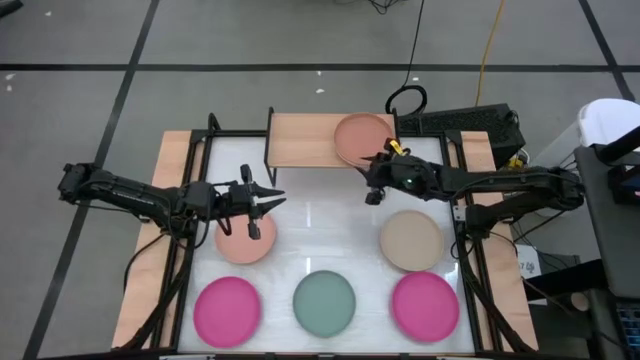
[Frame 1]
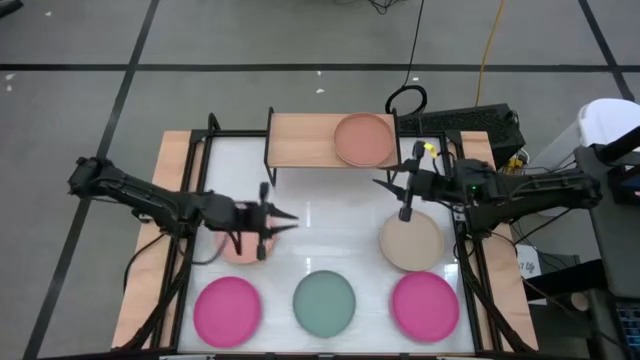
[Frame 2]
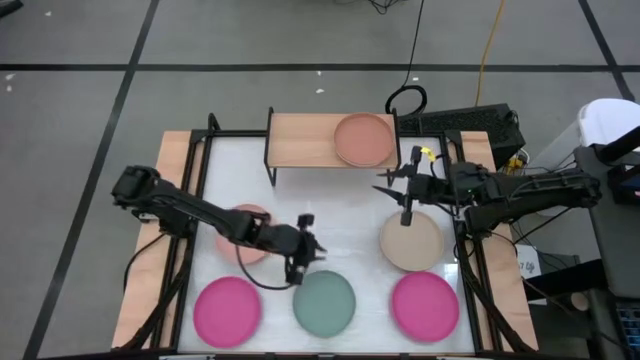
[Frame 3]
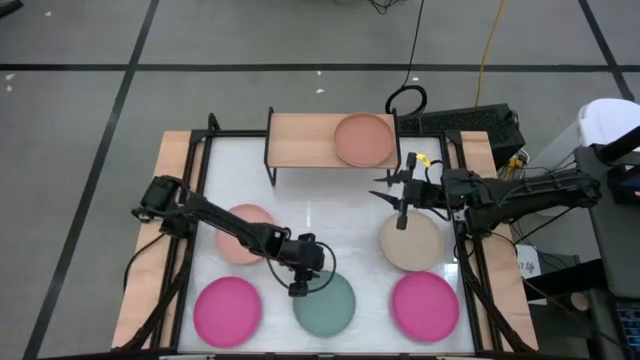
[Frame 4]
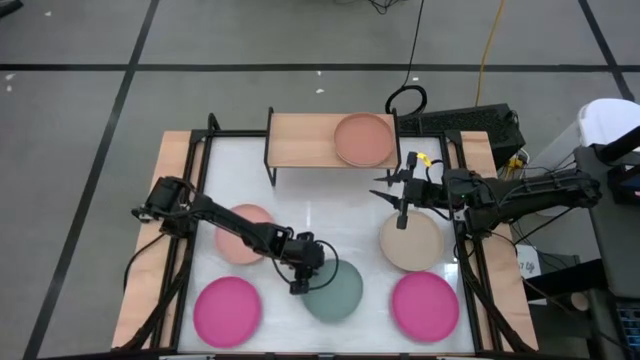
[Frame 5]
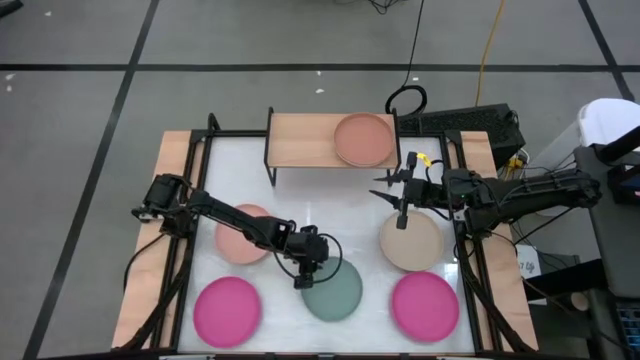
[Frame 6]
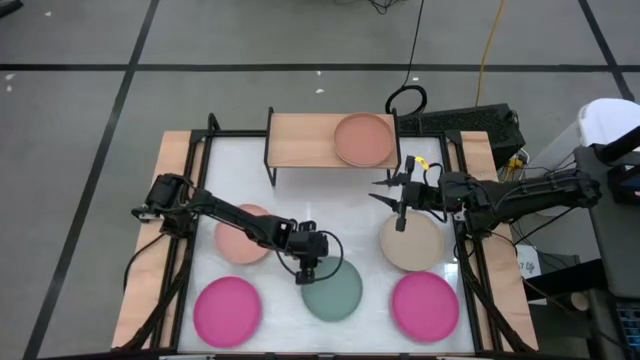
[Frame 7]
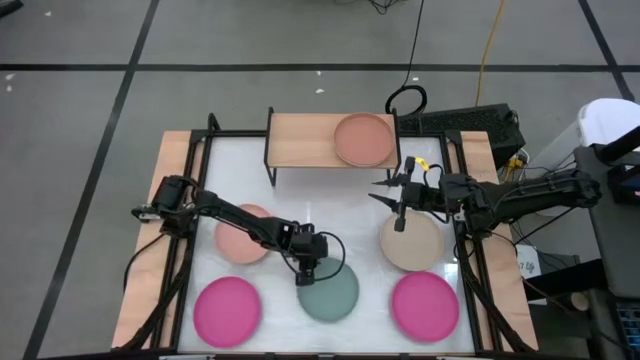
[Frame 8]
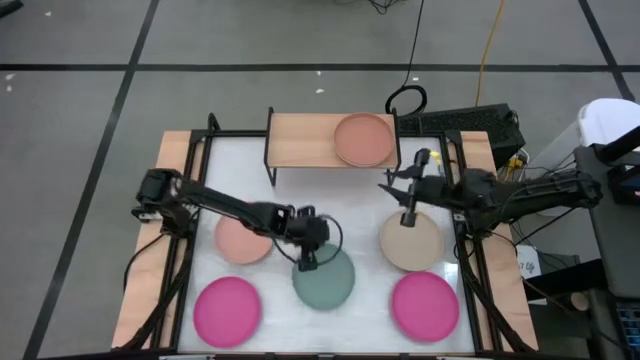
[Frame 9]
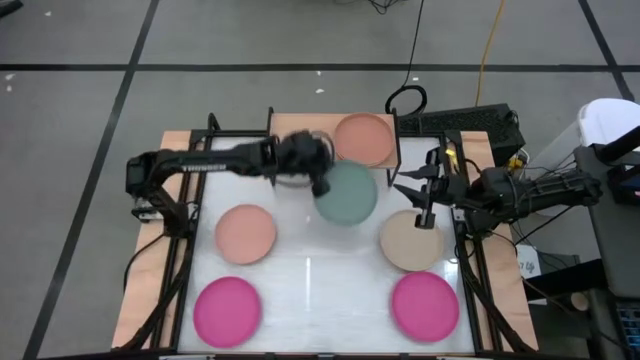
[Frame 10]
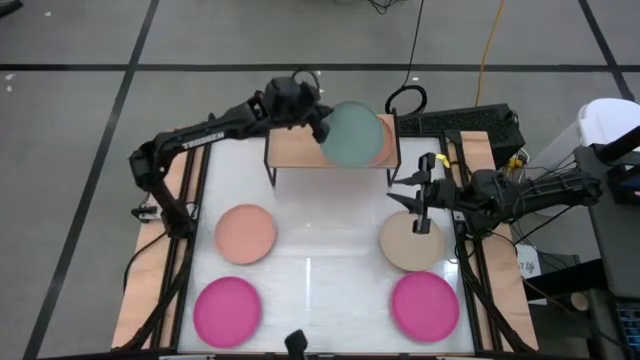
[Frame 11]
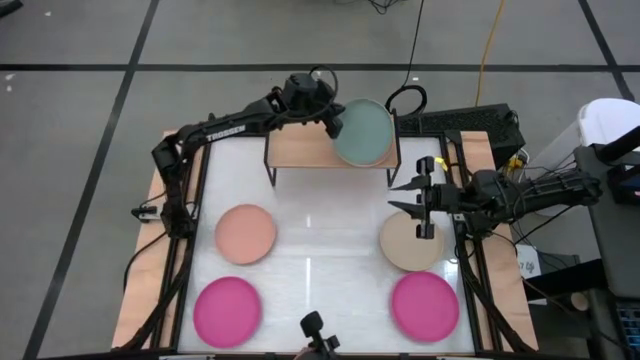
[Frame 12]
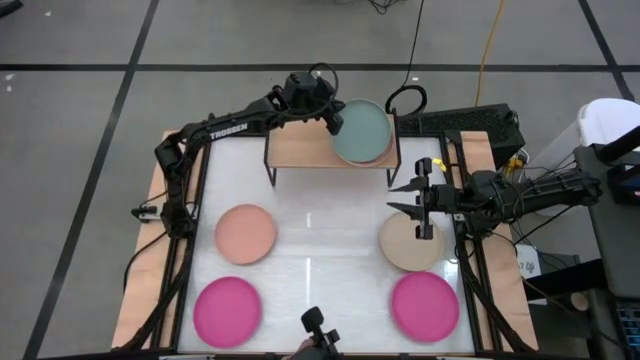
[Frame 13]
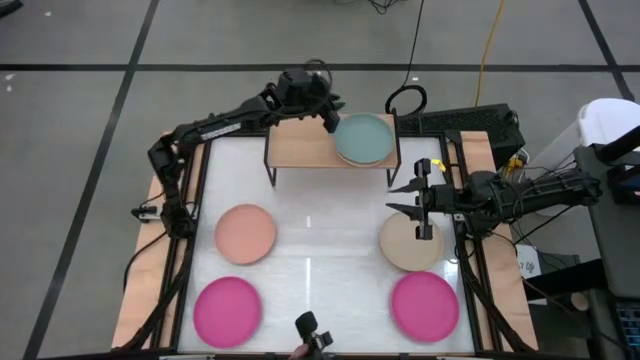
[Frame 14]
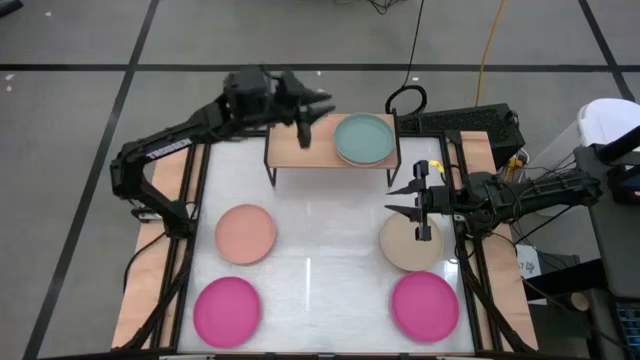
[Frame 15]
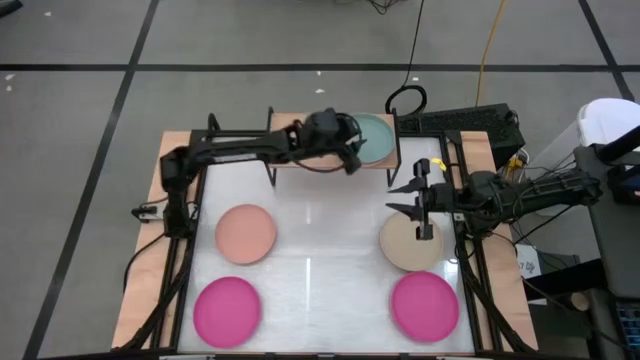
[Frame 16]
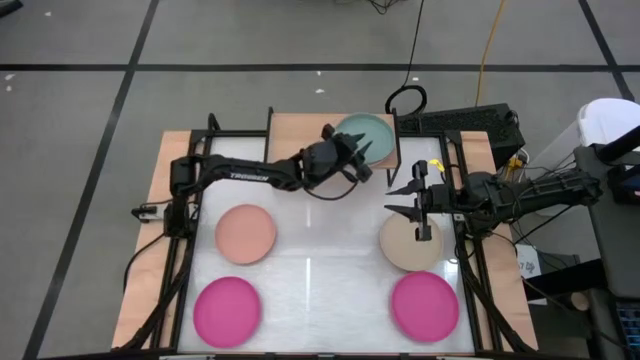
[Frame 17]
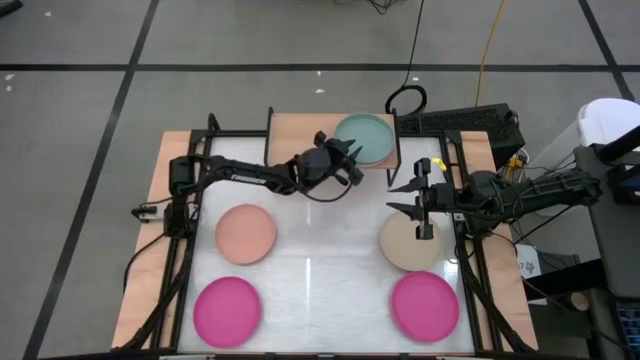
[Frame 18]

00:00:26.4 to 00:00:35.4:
Task: Place and stack plates onto a shelf
Stack the green plate on the brown plate

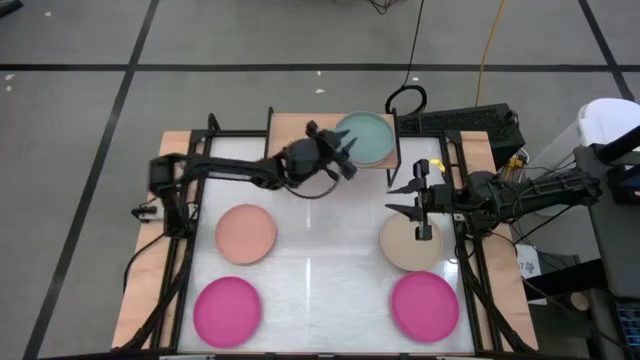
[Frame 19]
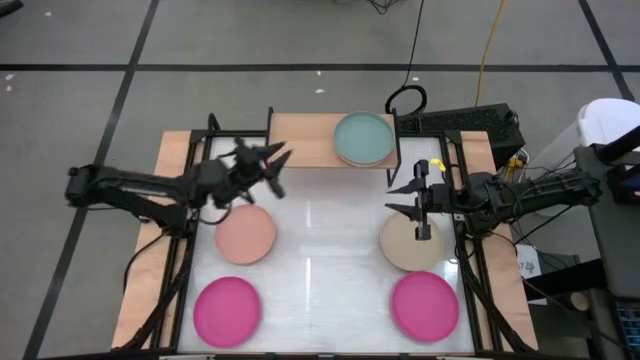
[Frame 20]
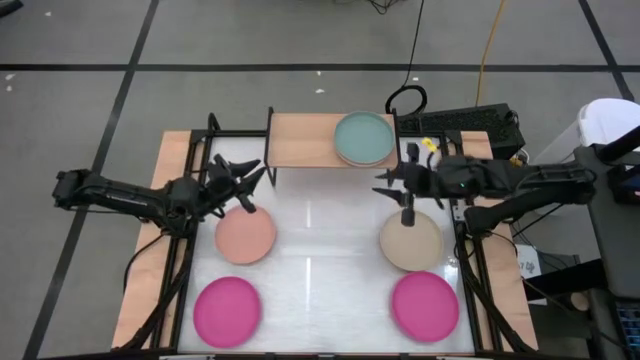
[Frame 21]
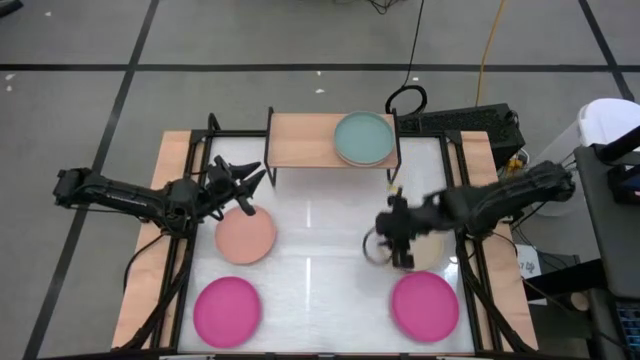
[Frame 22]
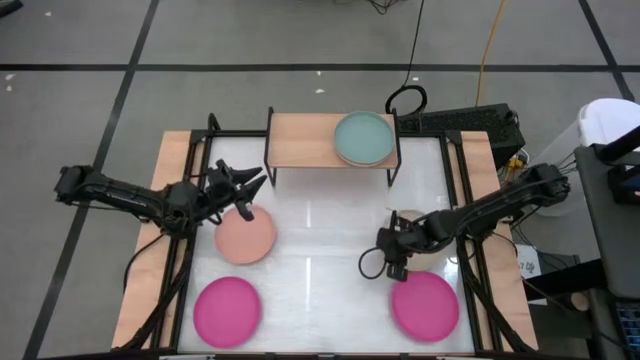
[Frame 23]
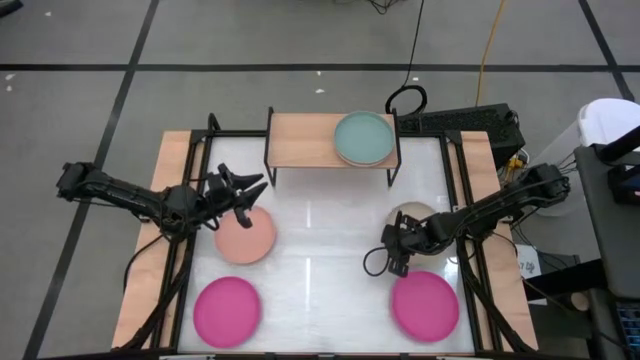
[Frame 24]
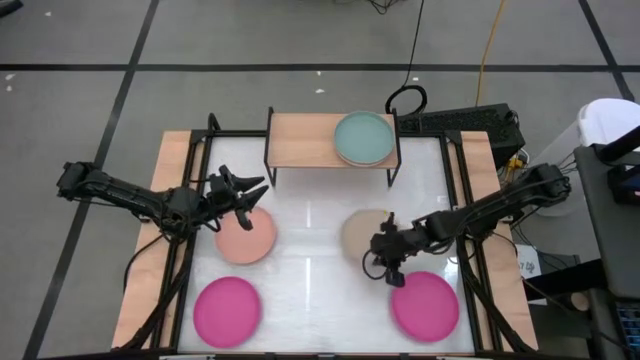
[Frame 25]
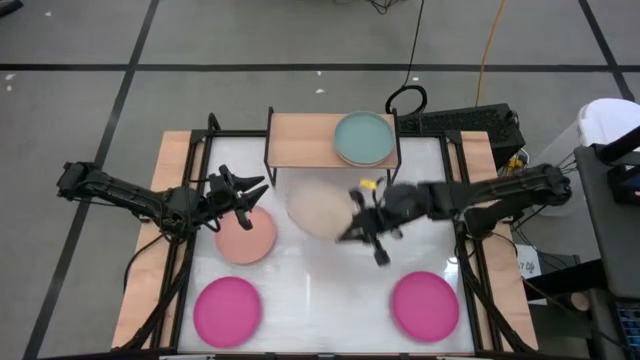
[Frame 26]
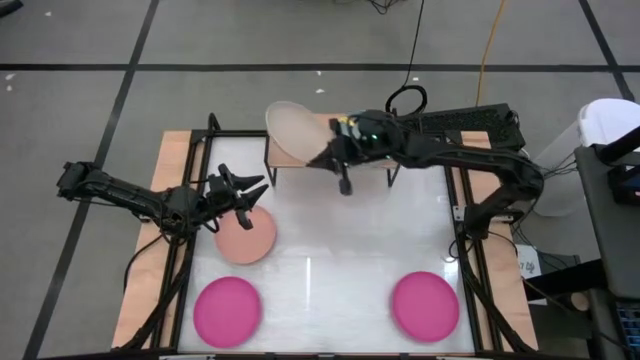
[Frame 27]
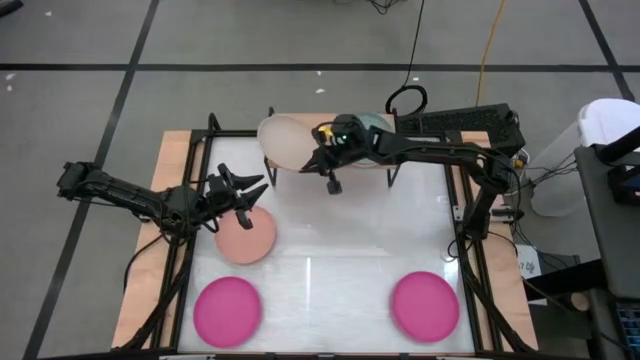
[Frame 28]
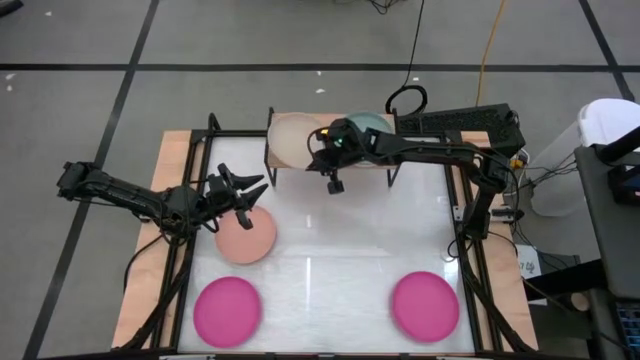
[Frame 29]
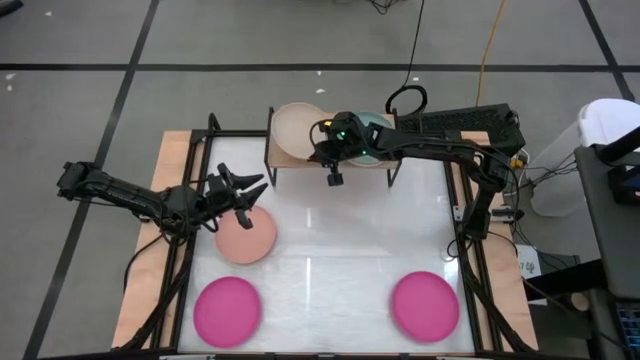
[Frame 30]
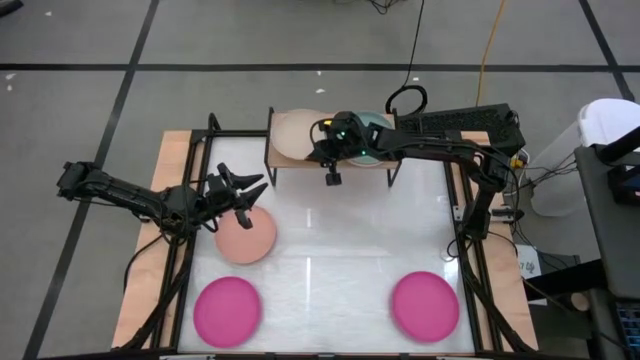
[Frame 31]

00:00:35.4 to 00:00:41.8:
Put the gray plate on the shelf

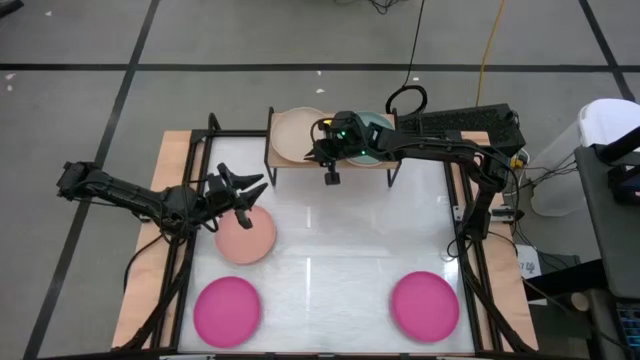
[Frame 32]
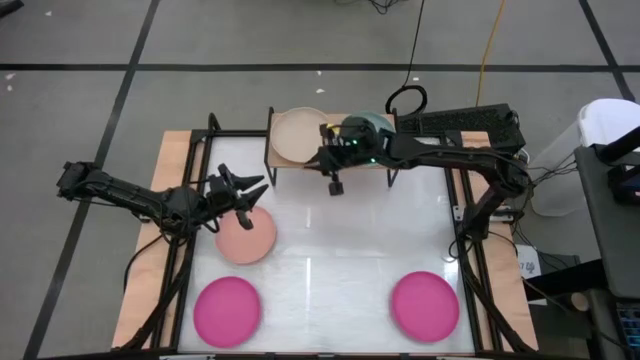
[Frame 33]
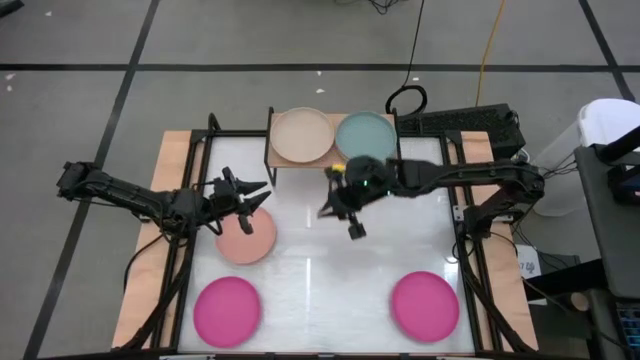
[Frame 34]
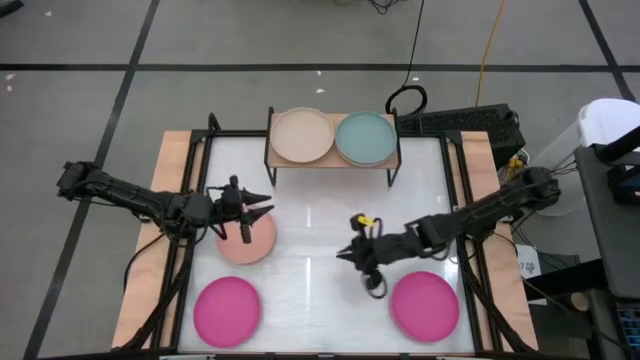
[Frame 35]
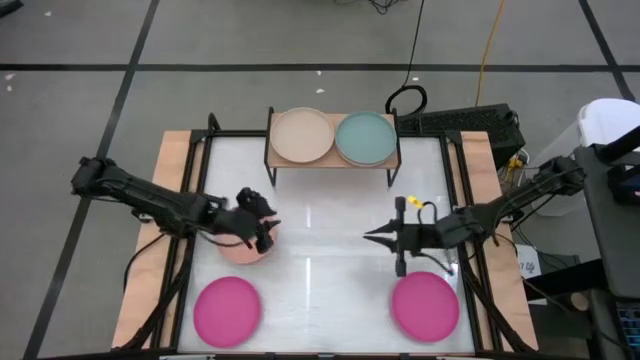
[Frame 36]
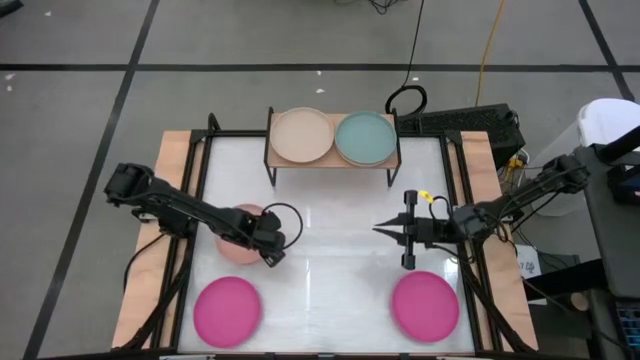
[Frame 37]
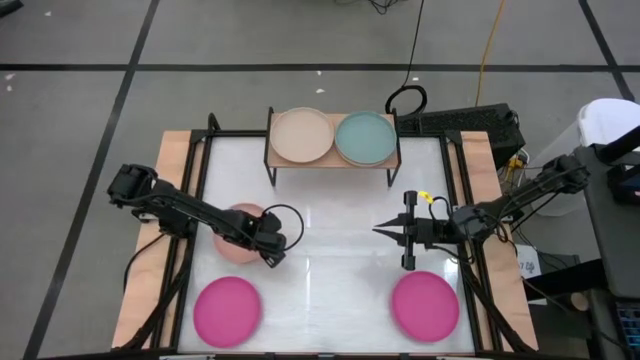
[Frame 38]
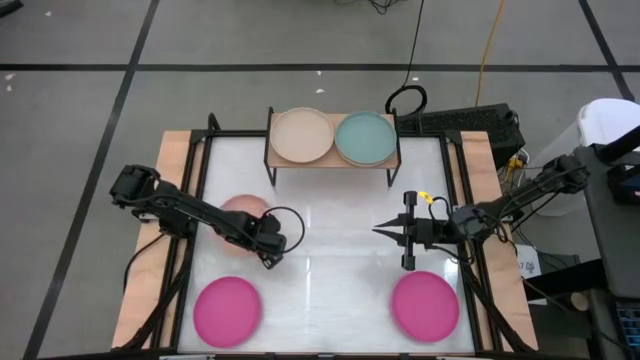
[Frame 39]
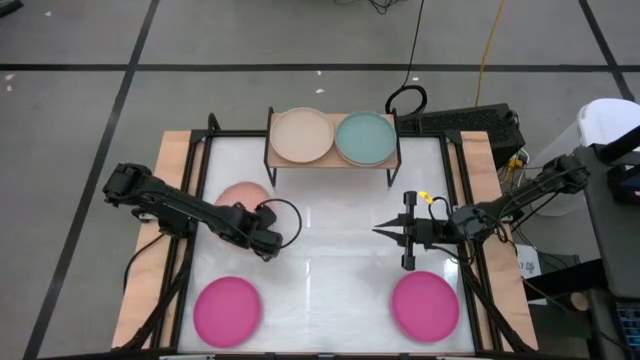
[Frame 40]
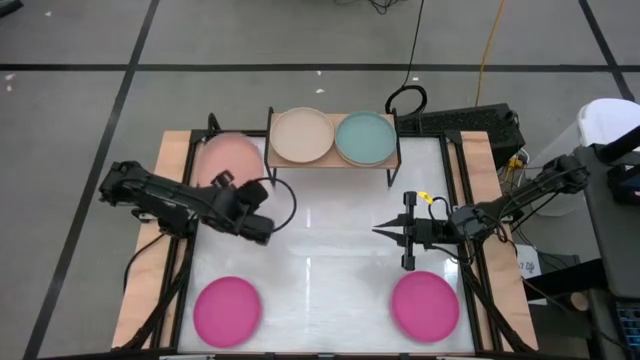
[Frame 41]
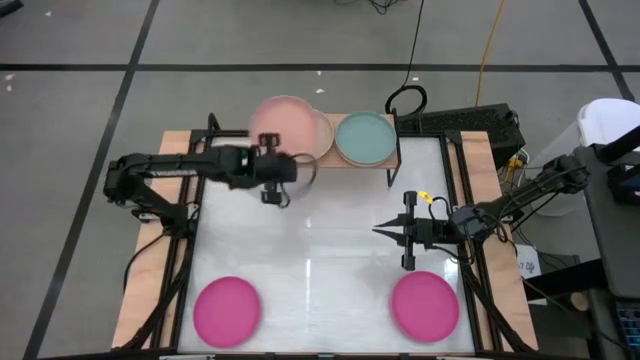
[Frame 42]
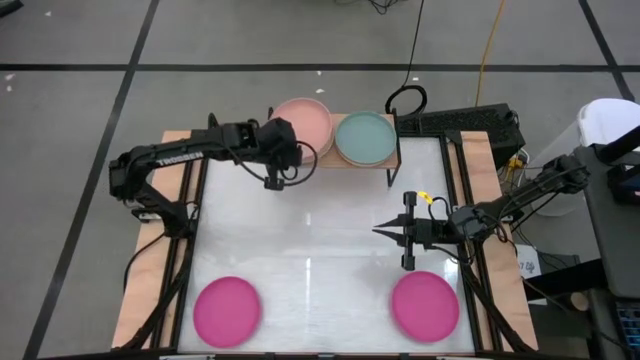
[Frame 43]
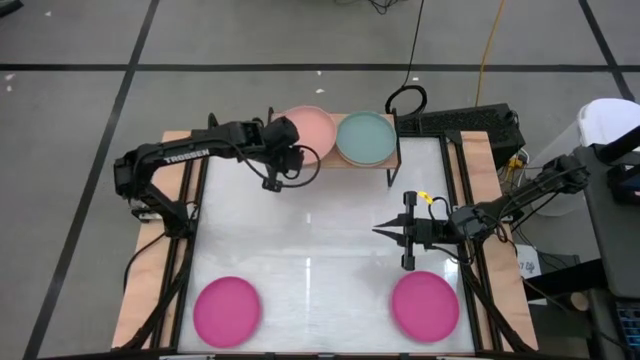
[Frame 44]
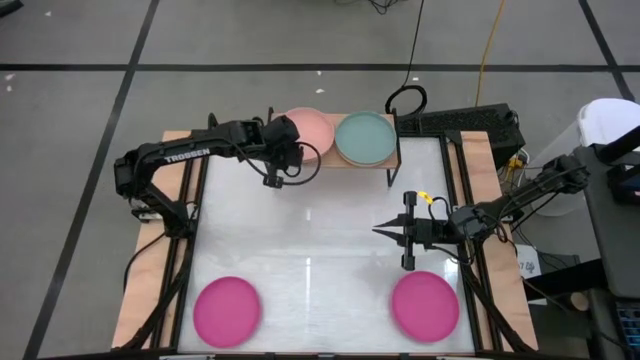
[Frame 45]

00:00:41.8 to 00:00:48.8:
Stack the light brown plate on the gray plate
